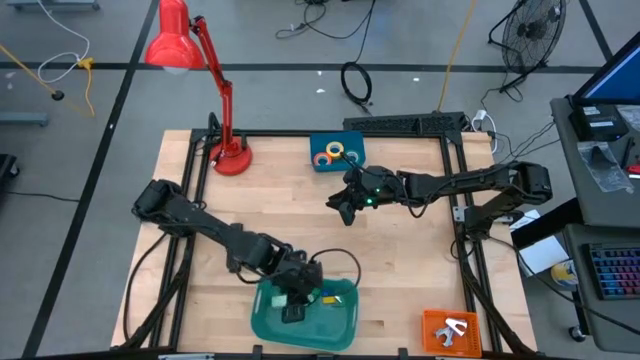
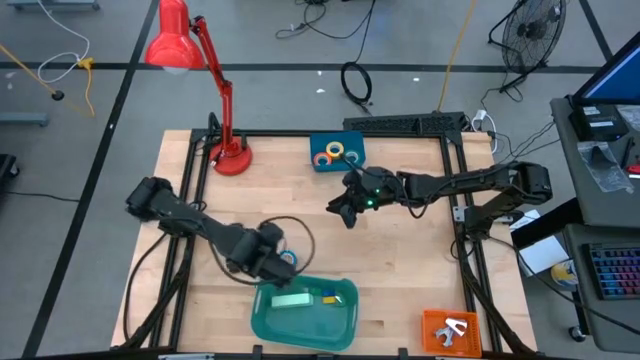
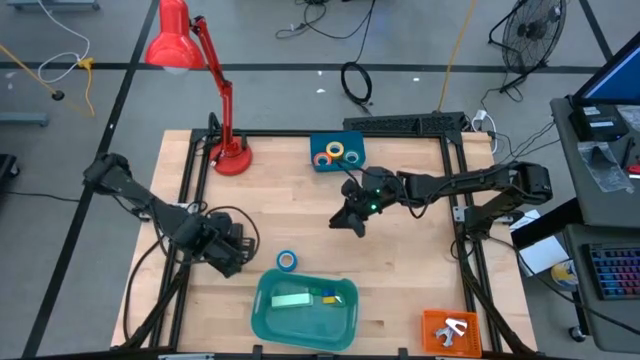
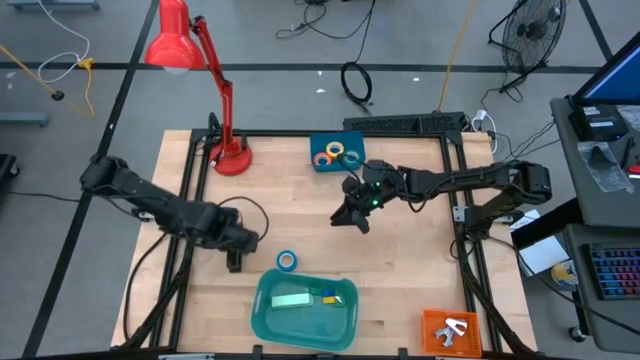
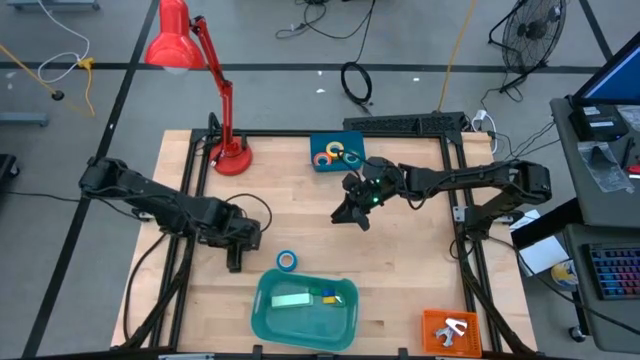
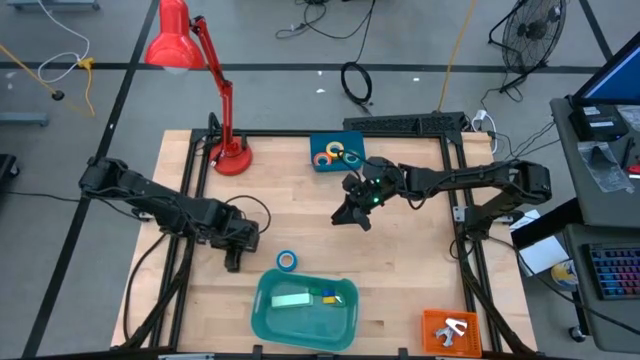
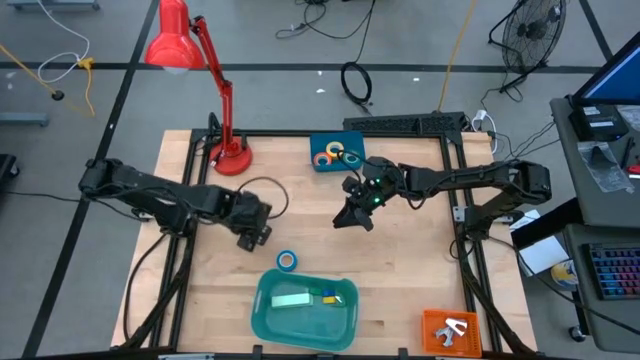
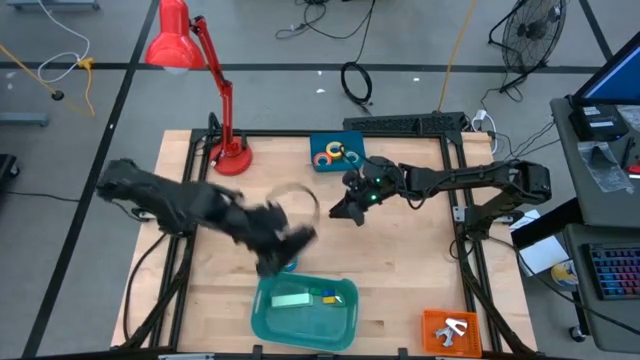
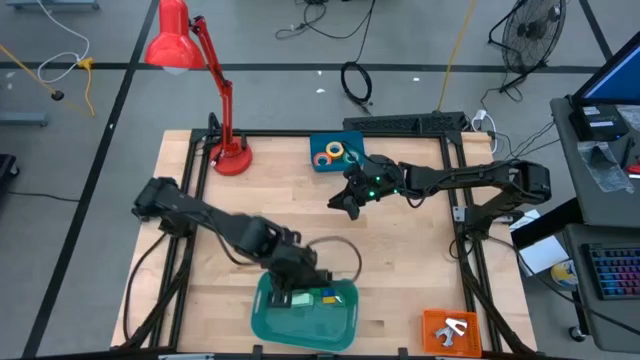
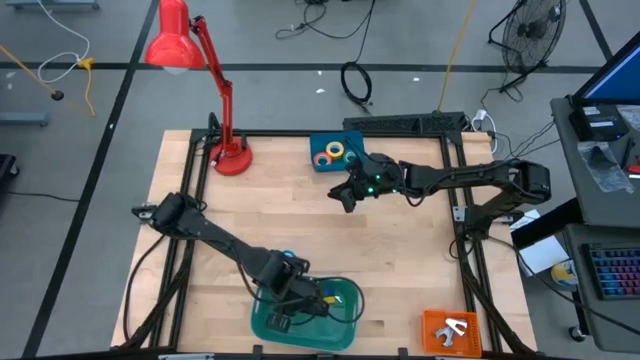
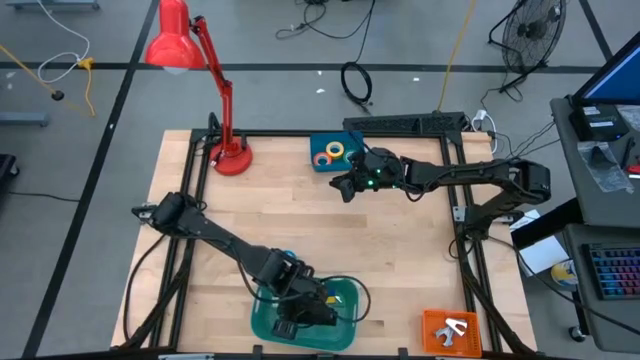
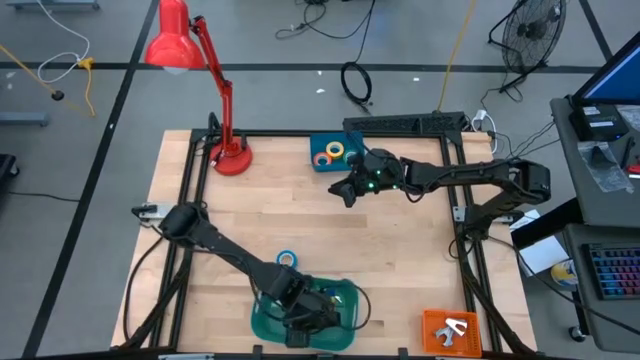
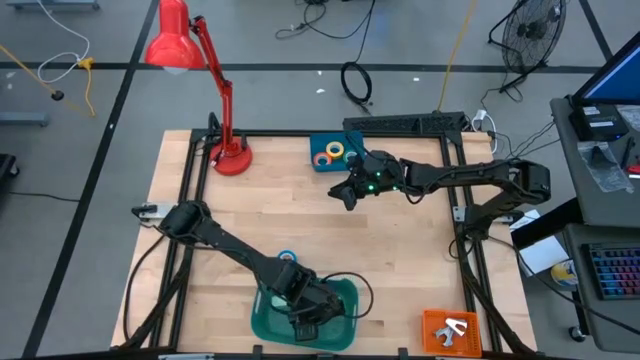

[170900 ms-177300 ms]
Task: Pick and place Stapler, Stapler remover, tape
Put the black stapler into the green bin

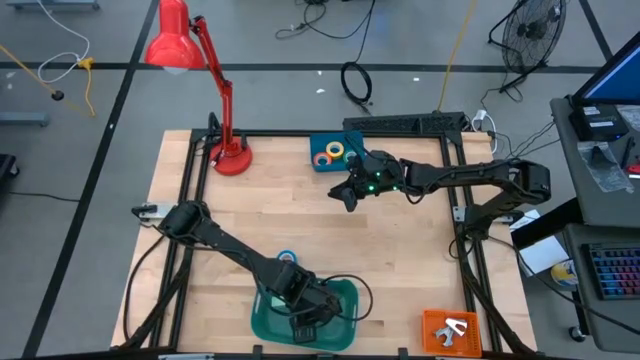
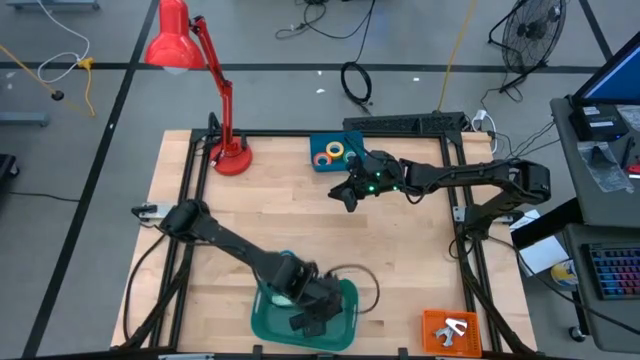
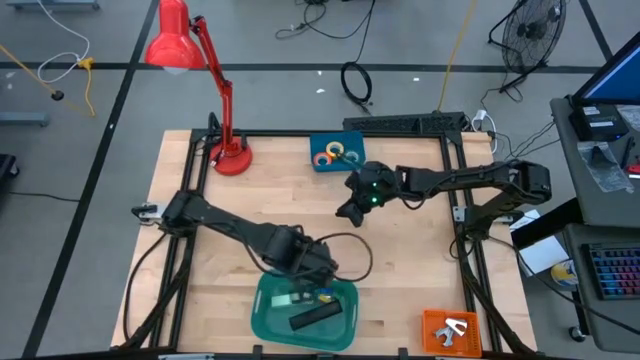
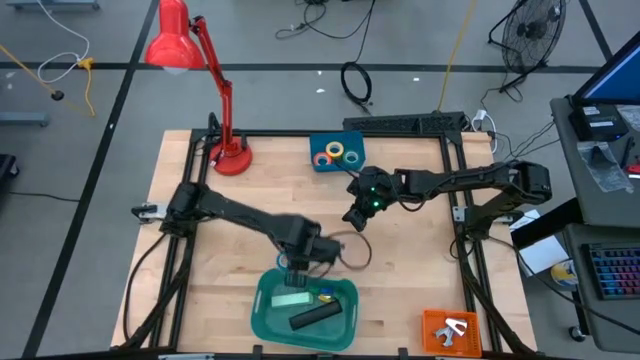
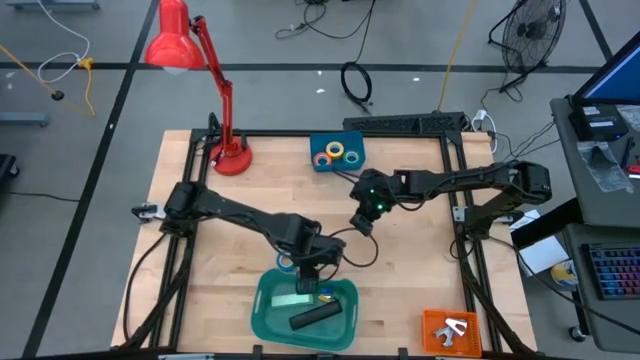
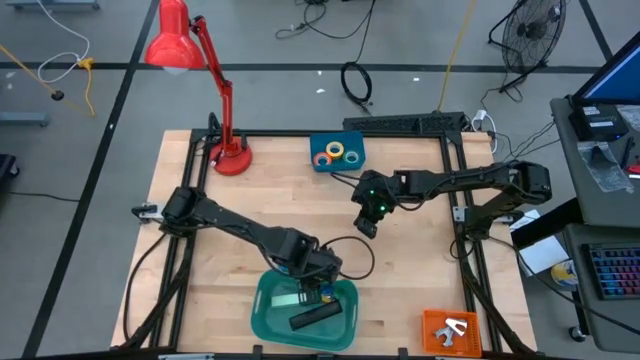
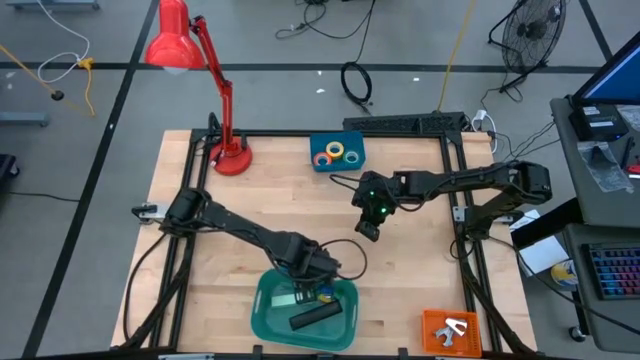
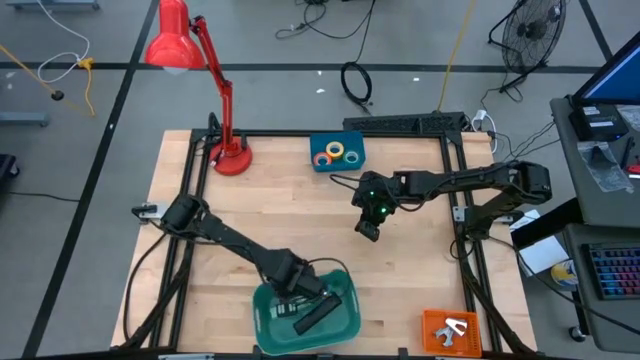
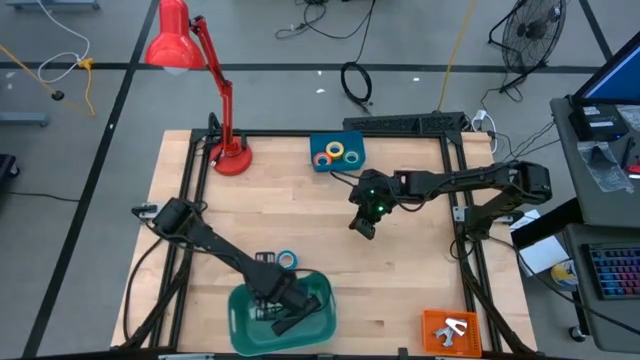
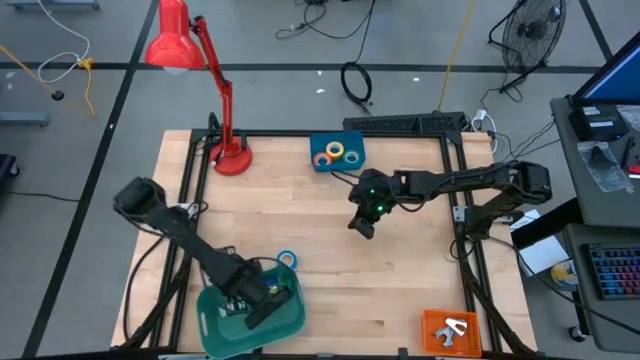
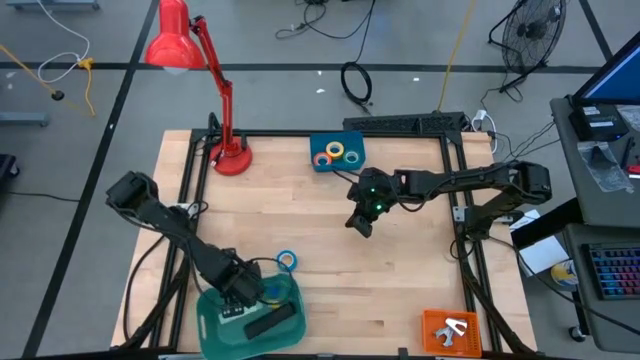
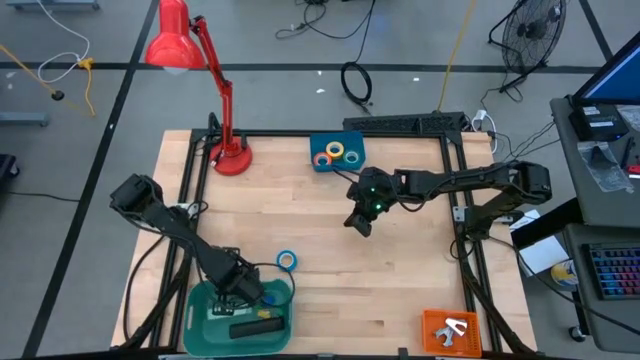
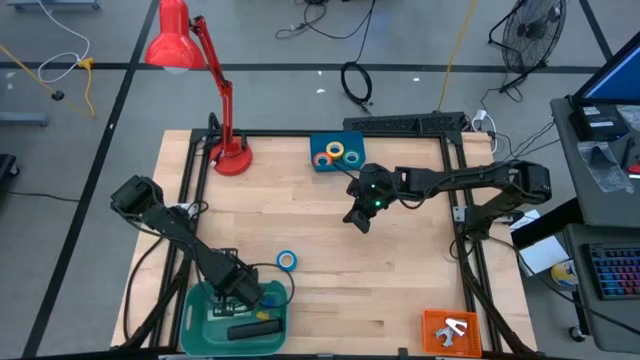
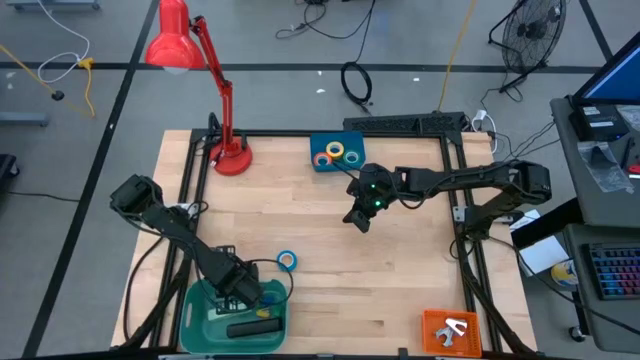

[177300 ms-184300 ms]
Adjust the green bin

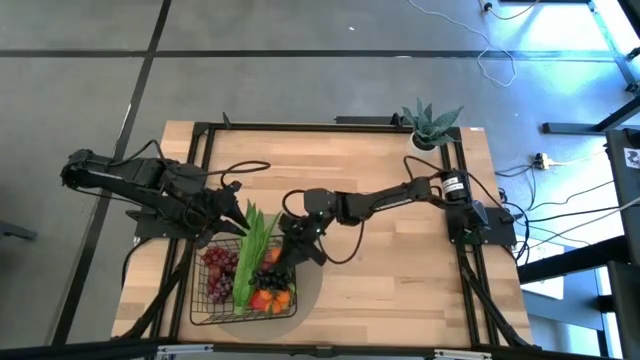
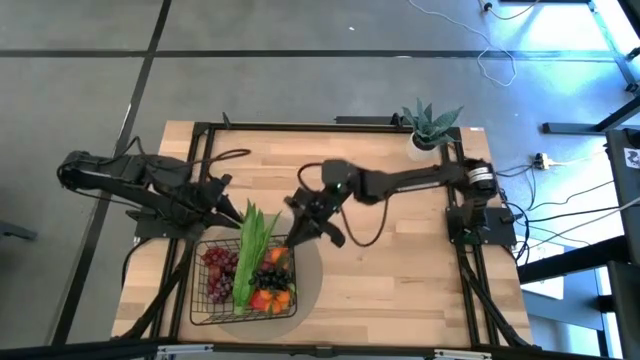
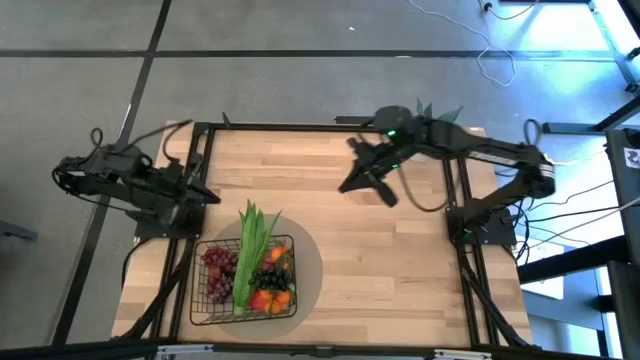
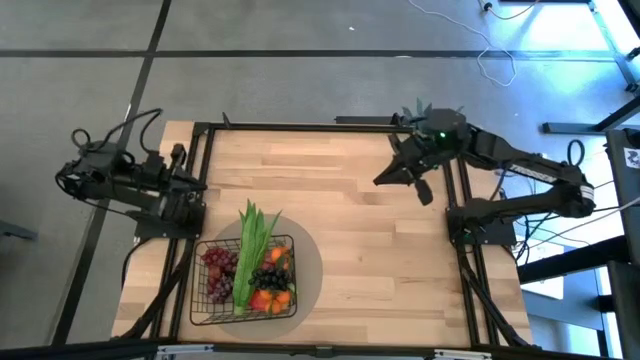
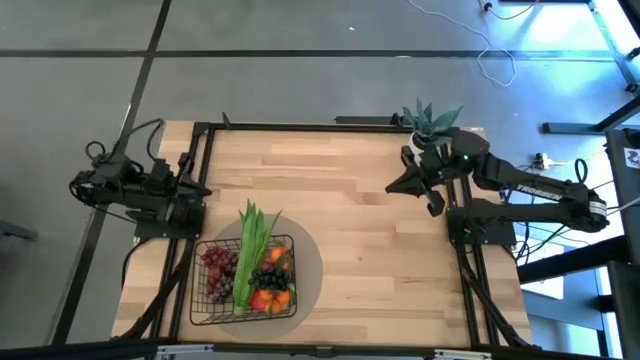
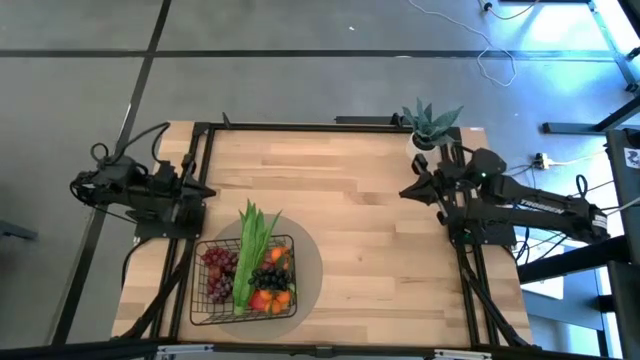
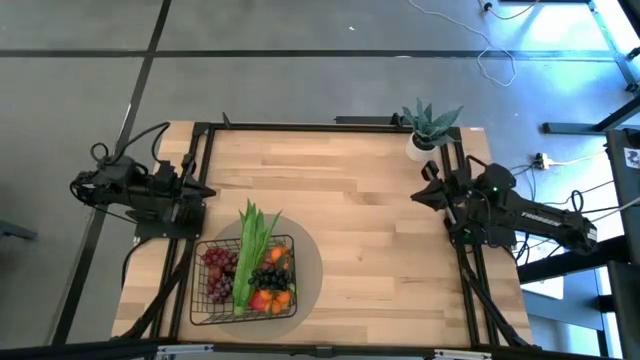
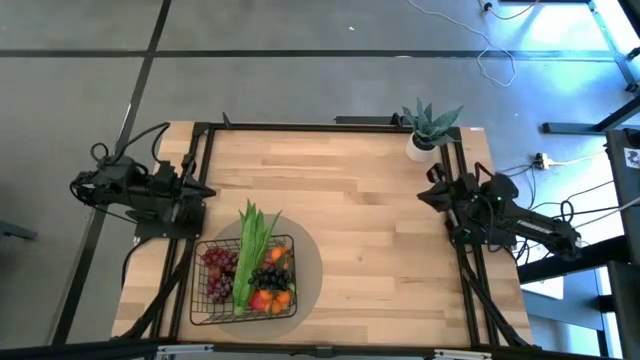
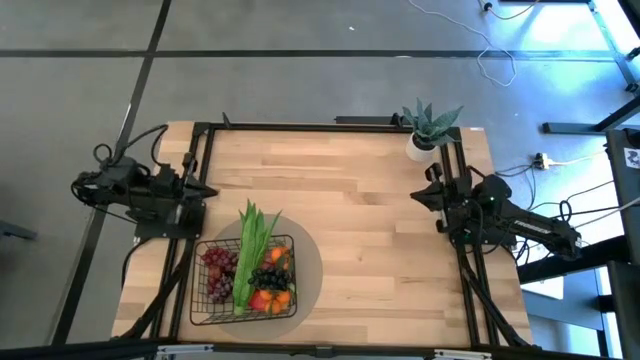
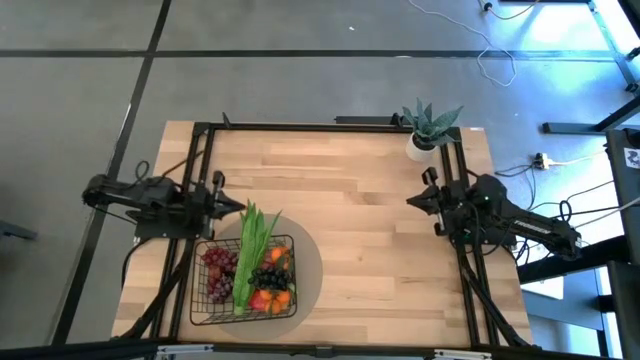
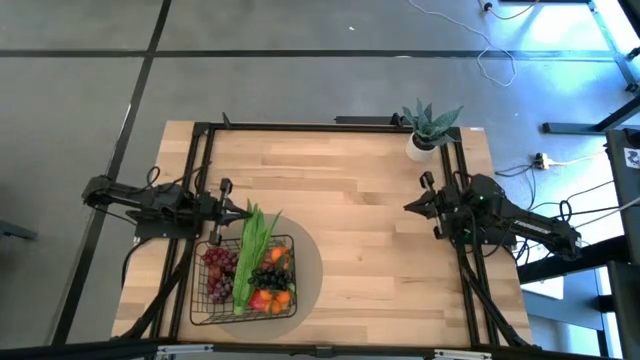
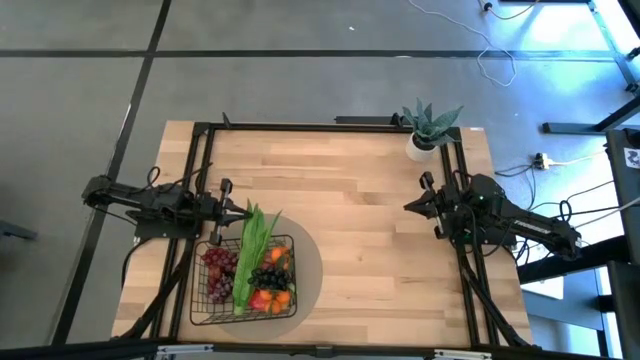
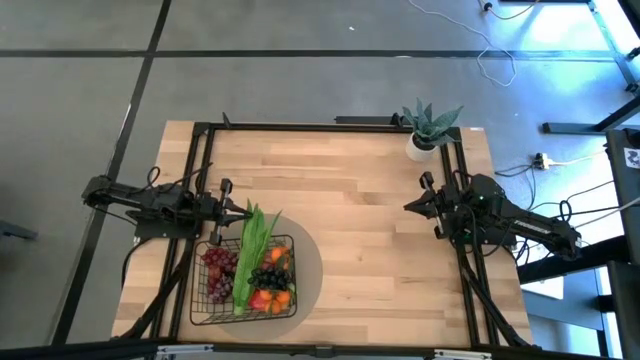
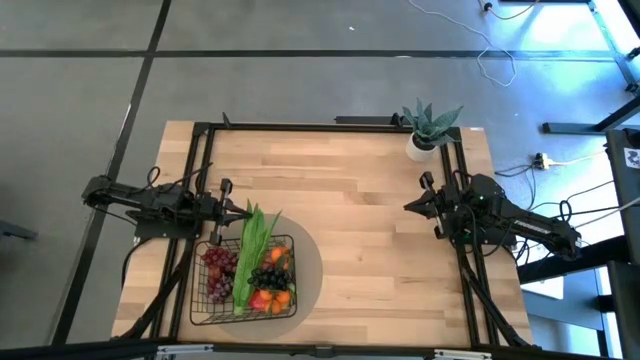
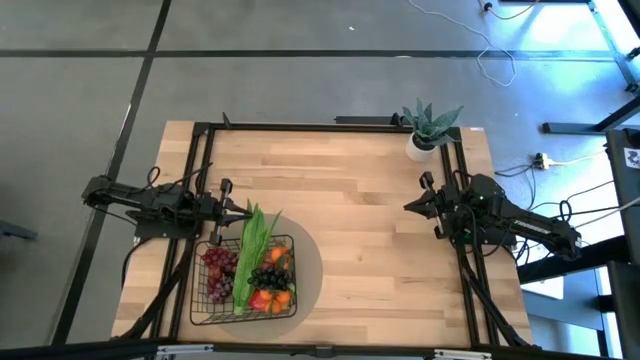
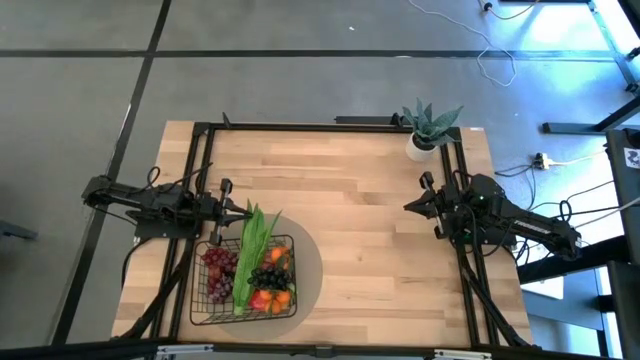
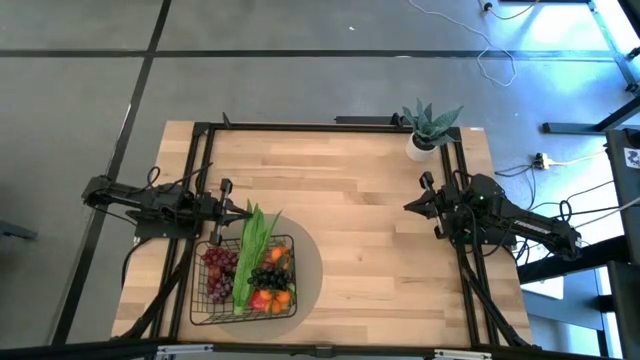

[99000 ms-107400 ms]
Task: Build produce basket
Return to Home Position
